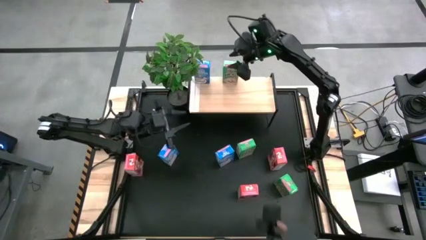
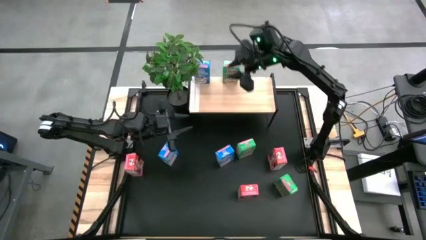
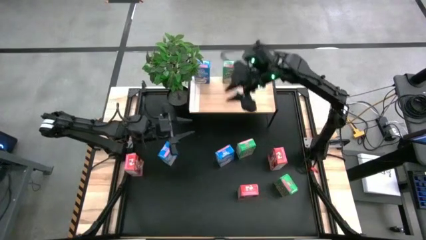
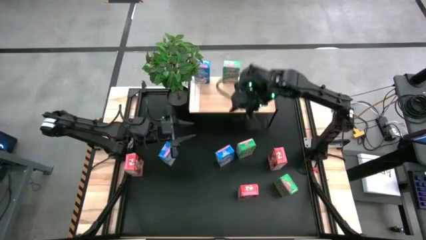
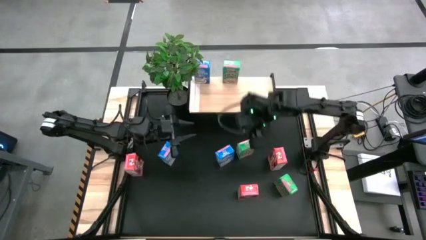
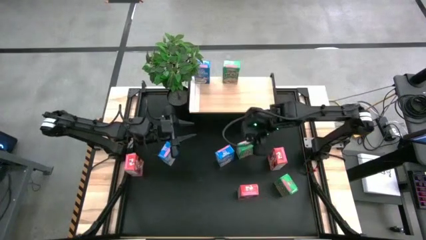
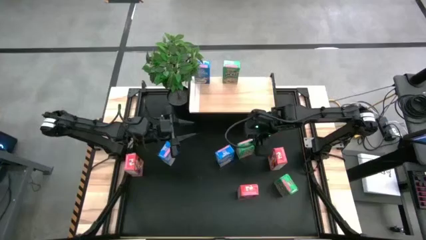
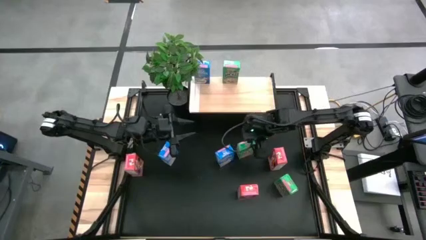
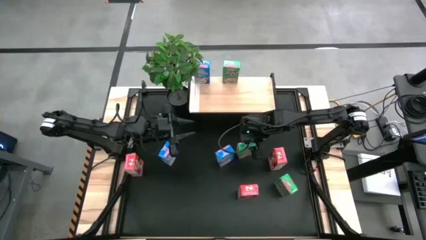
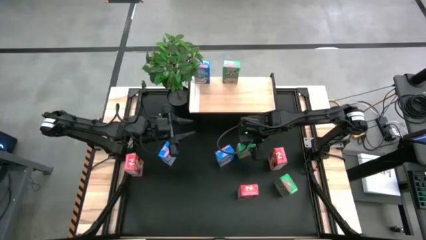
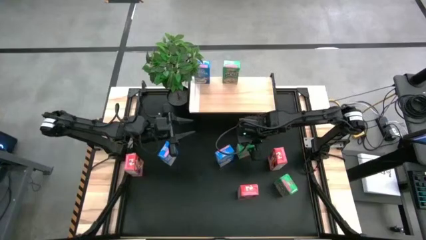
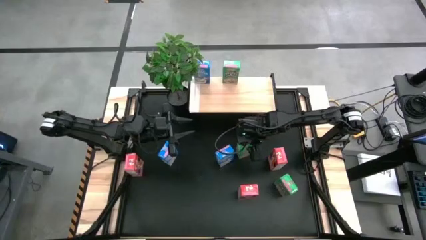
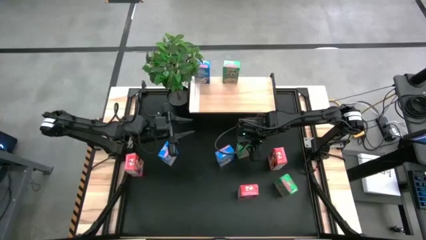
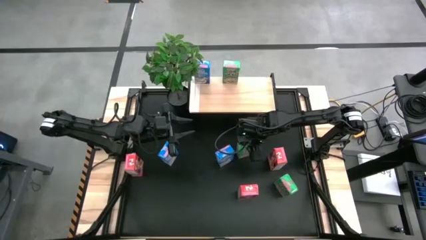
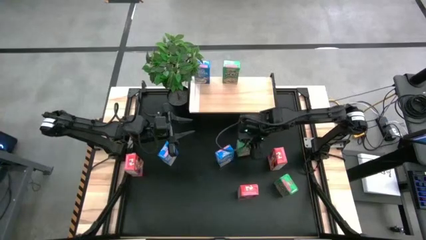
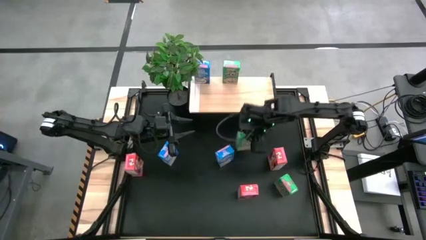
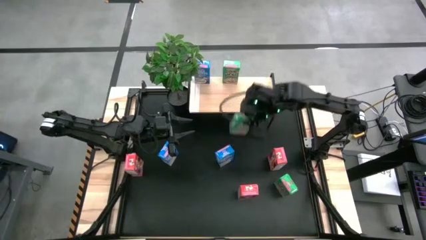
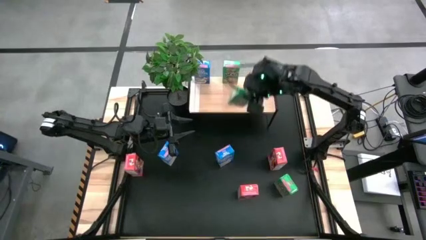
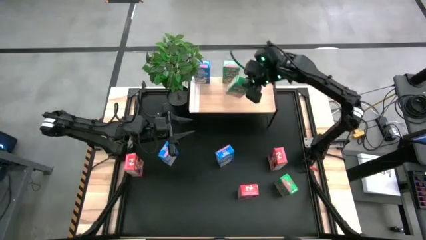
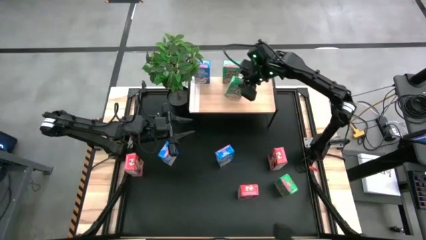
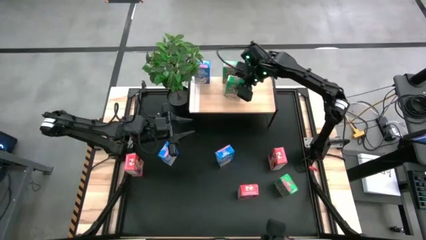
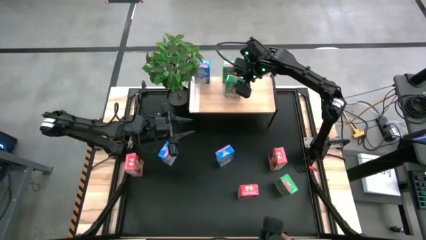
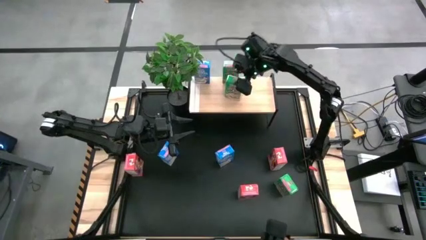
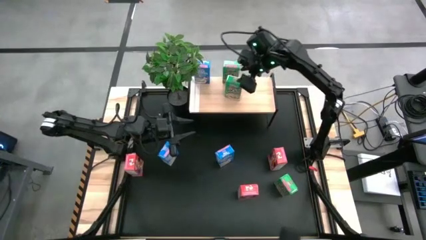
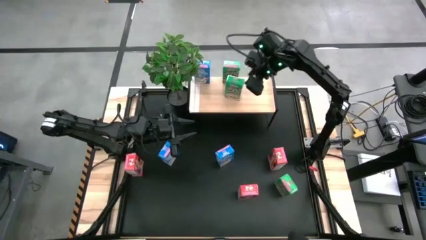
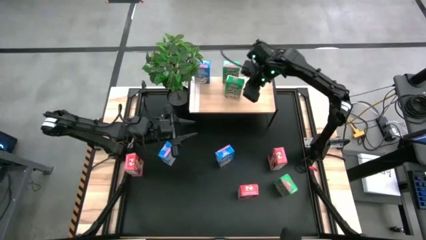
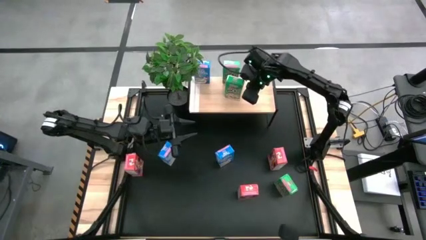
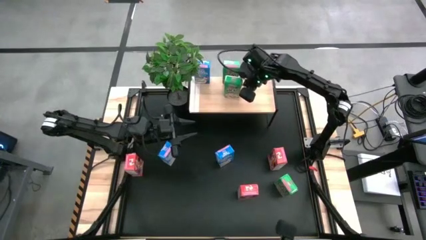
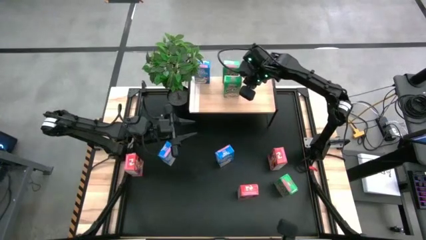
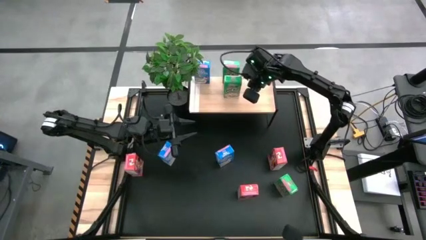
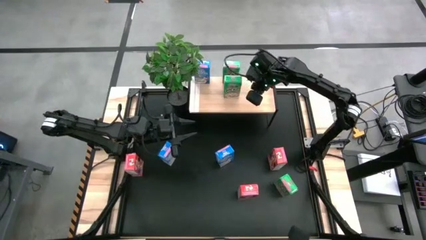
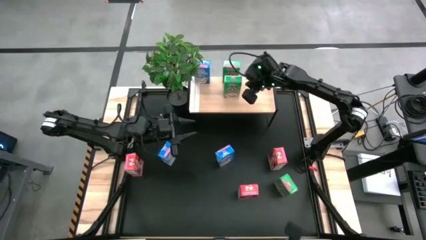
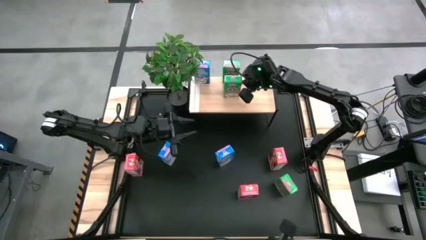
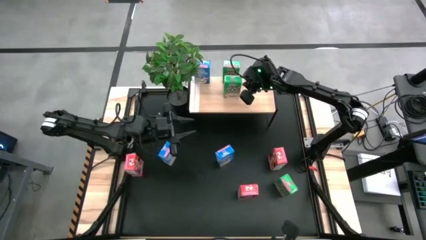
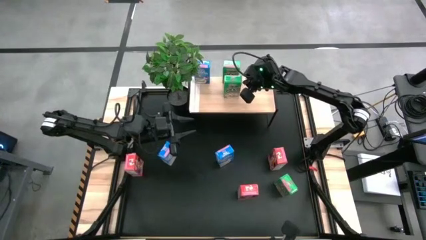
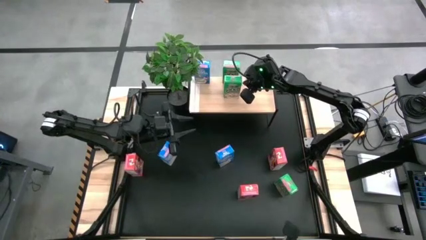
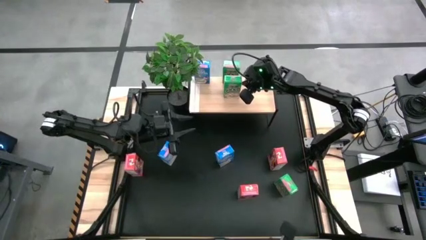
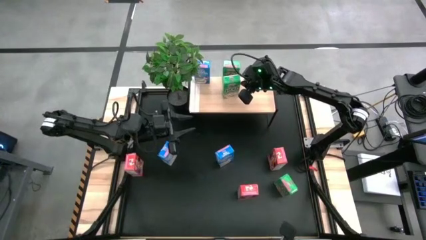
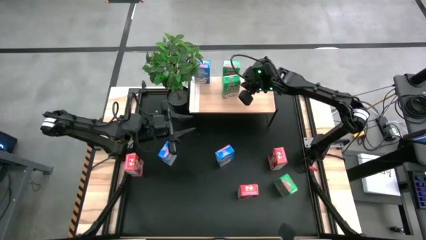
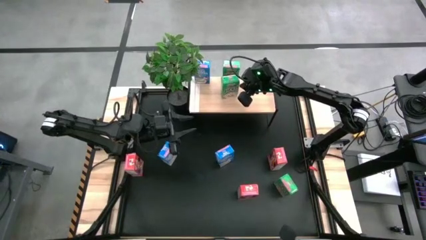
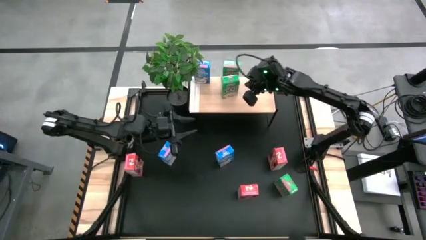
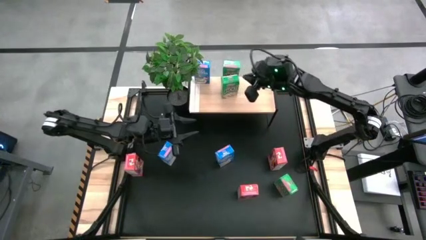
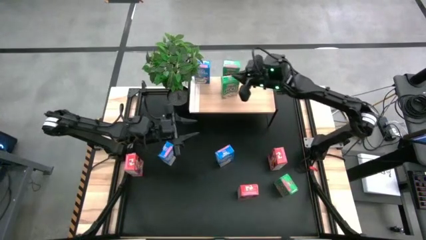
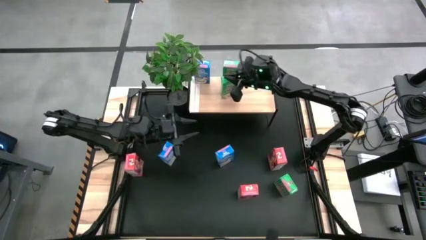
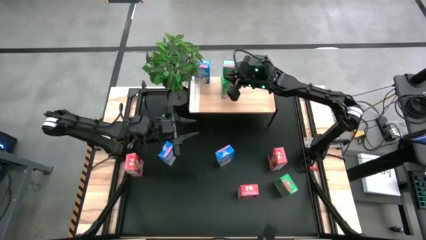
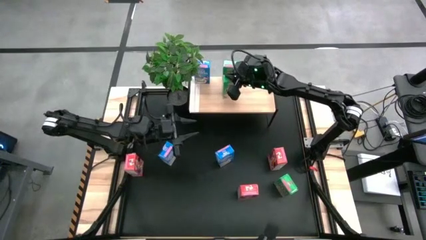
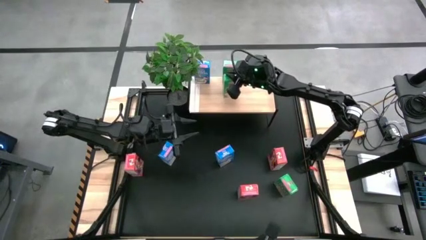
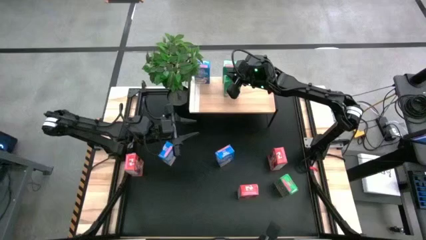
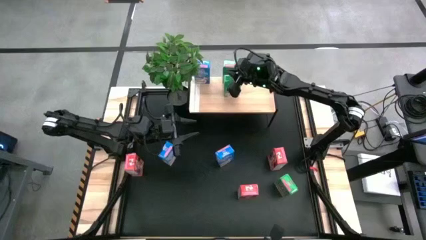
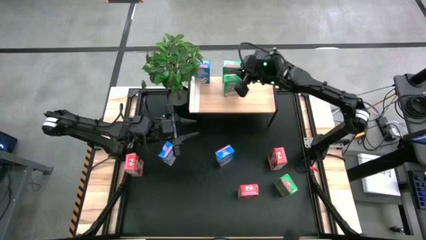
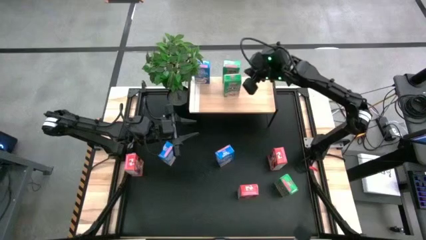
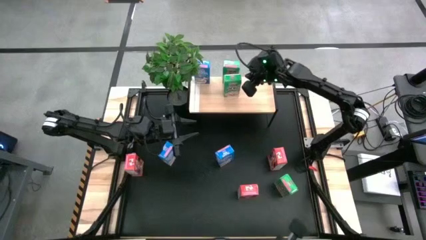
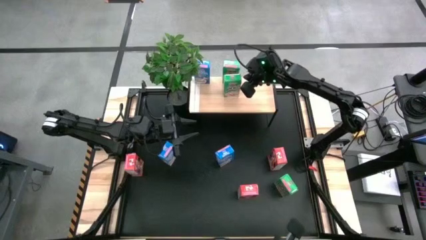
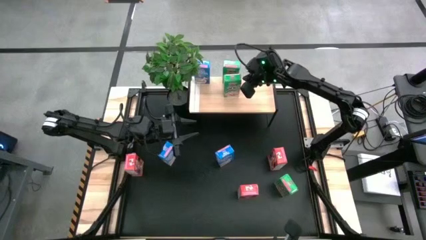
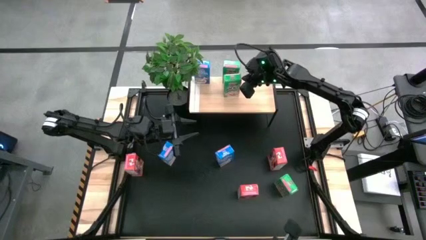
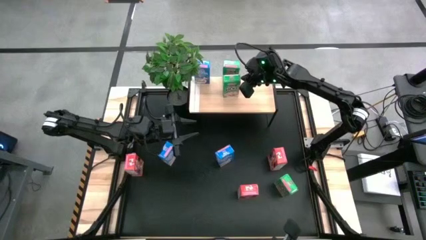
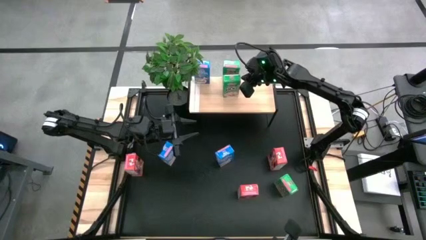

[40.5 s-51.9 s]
Task: Stack cereal on shelf
Put the top green cereal box on the shelf, aligned with the other green cereal box

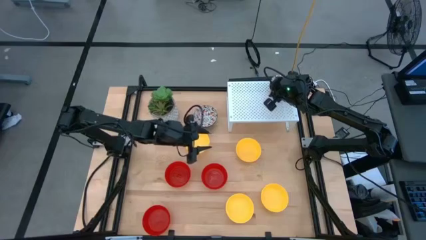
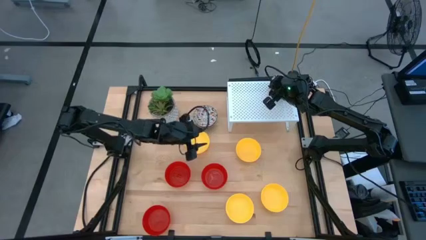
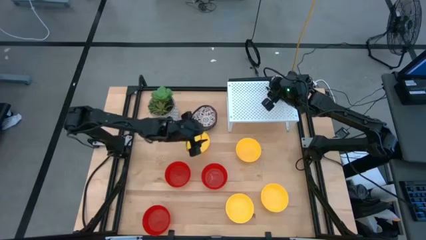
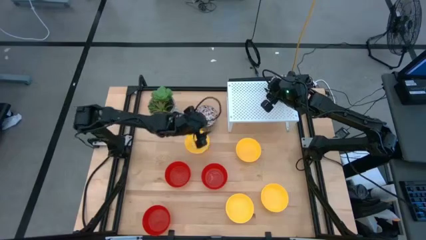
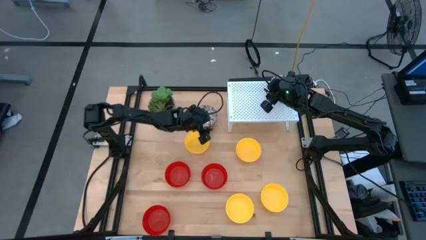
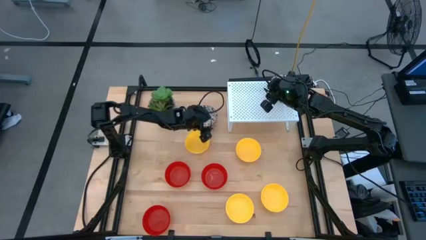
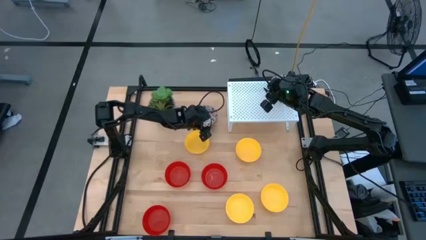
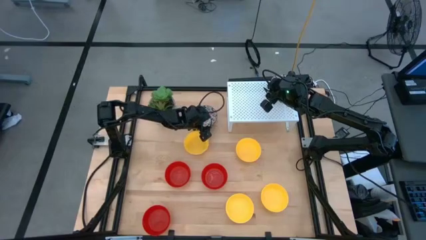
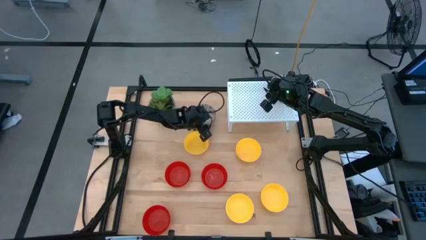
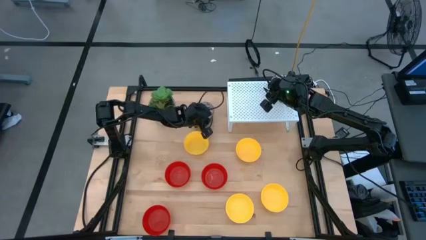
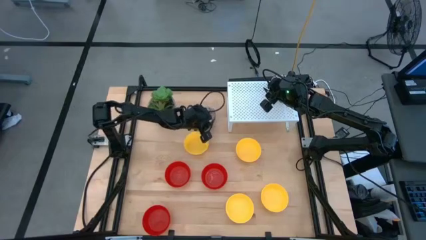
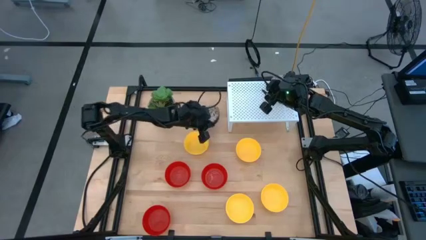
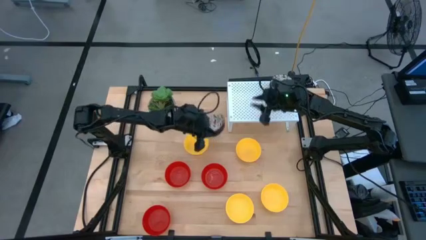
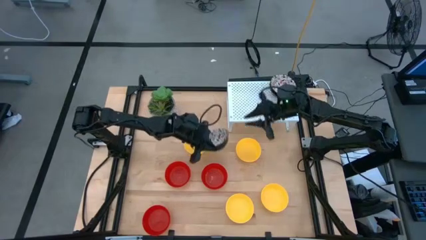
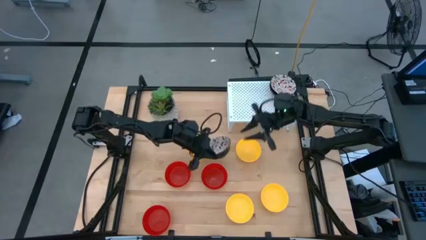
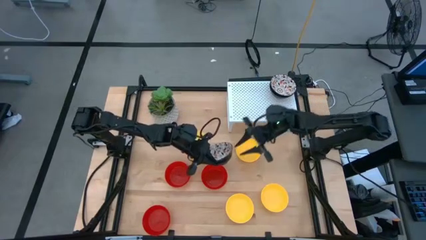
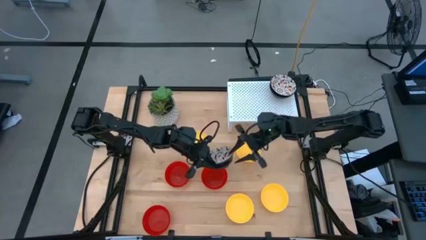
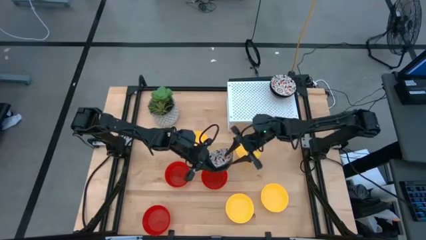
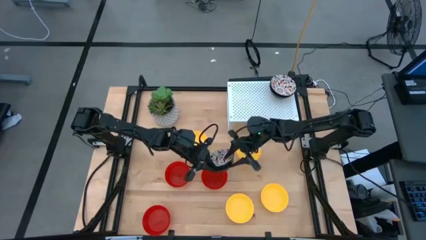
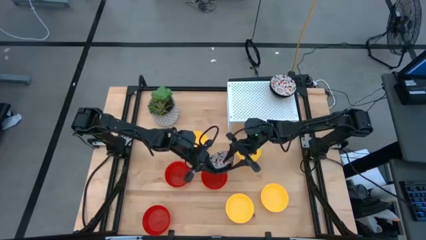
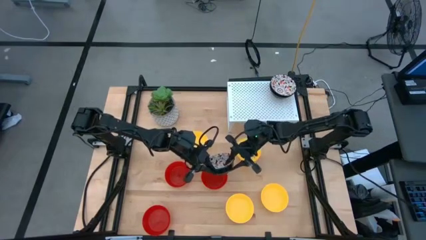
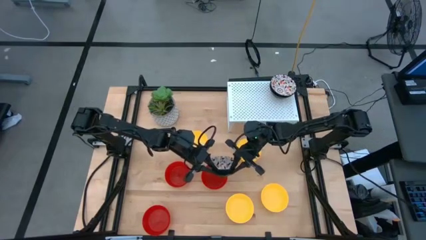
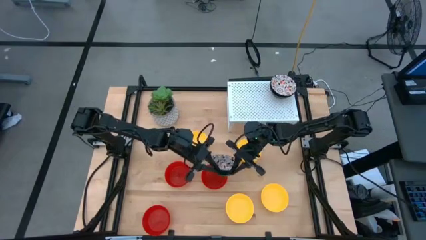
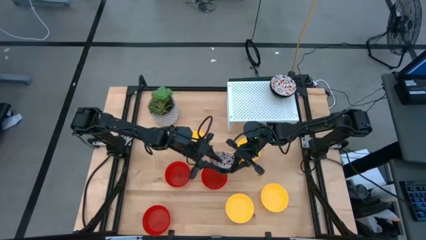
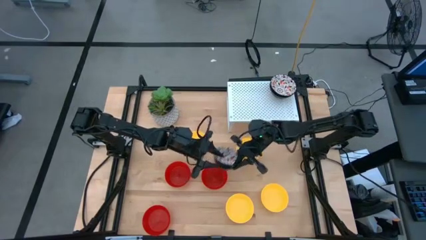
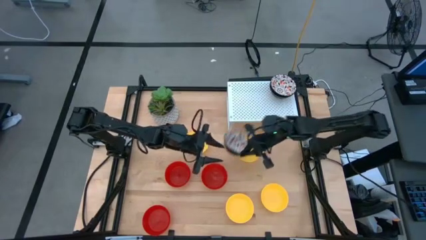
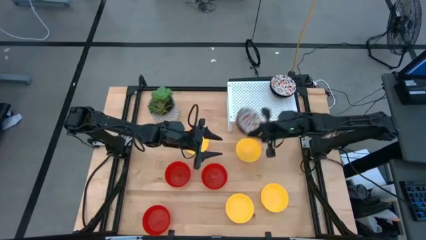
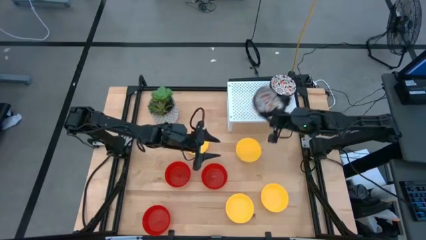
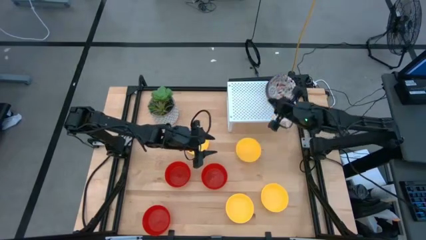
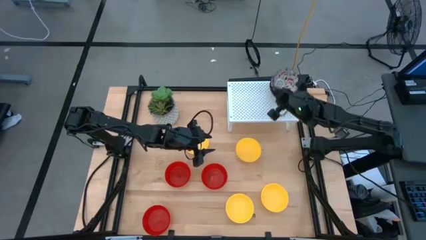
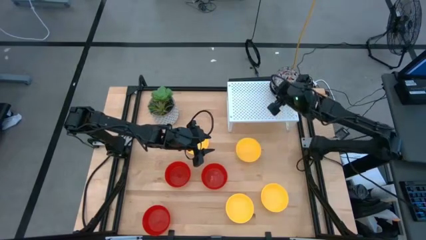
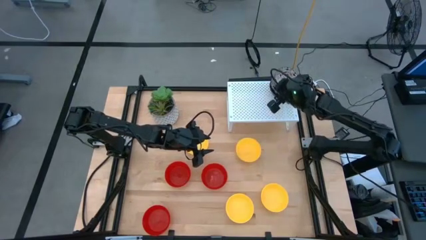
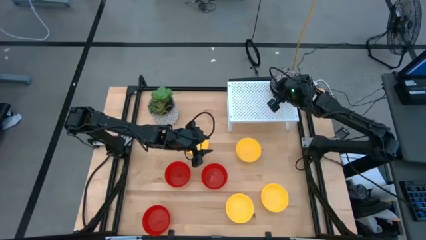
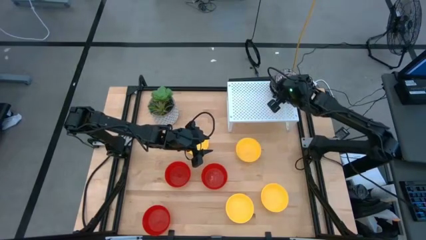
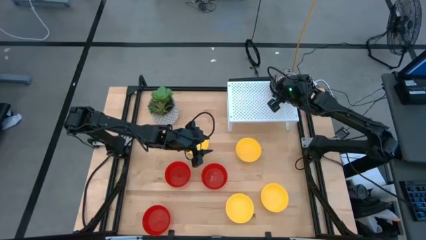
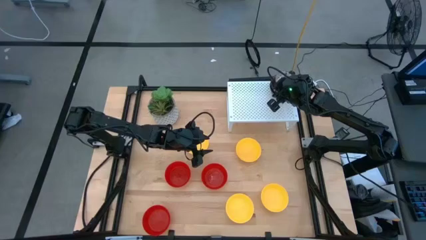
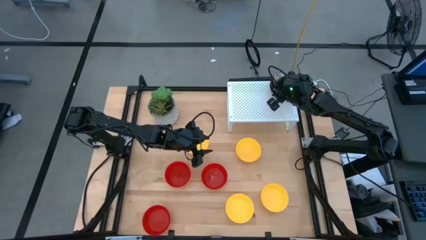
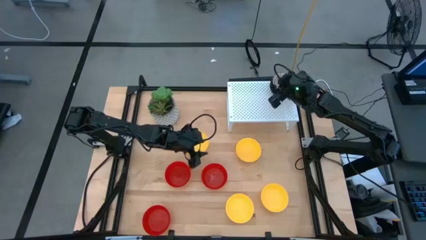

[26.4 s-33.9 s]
Task: Pick & Place Mini bowls
Stack the white and black bowl on top of the white and black bowl on the shelf
